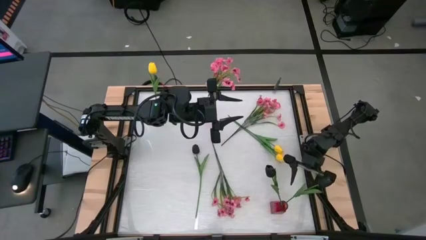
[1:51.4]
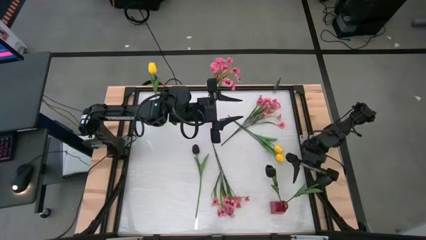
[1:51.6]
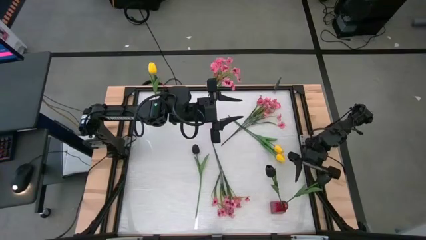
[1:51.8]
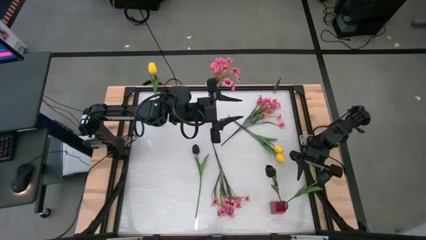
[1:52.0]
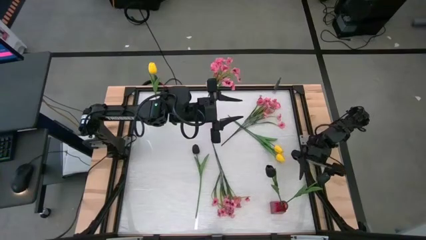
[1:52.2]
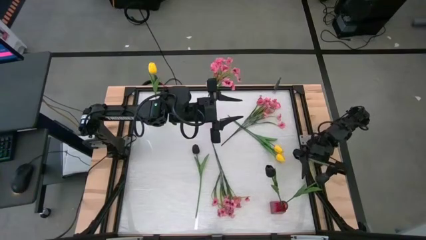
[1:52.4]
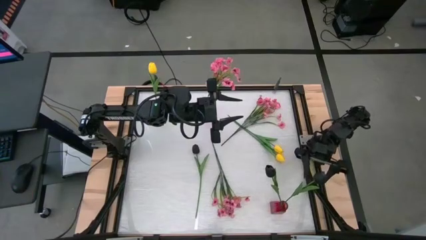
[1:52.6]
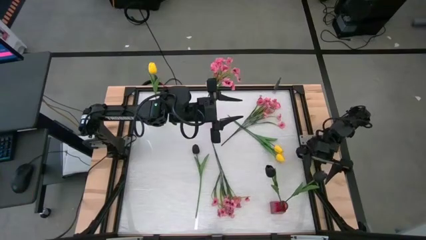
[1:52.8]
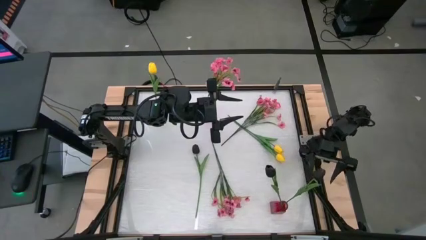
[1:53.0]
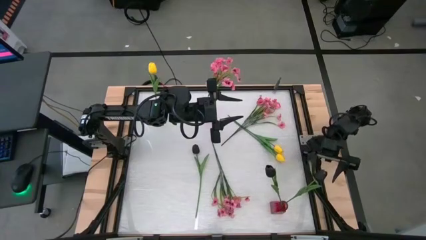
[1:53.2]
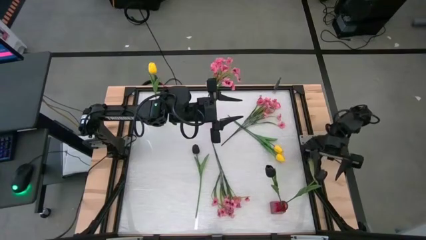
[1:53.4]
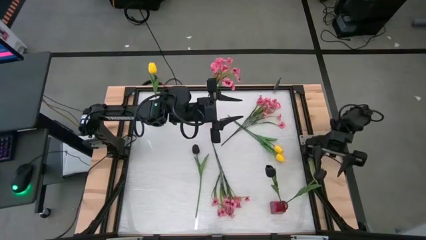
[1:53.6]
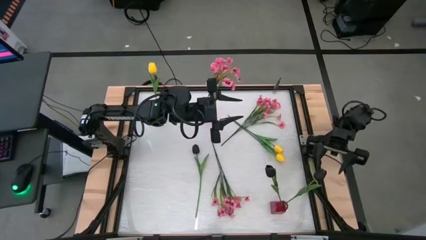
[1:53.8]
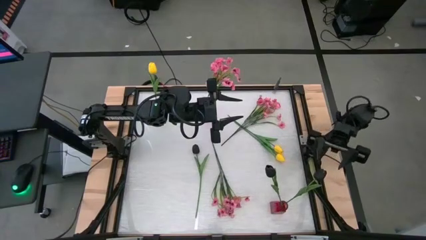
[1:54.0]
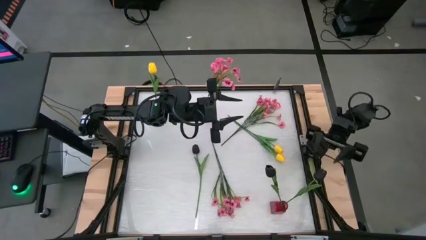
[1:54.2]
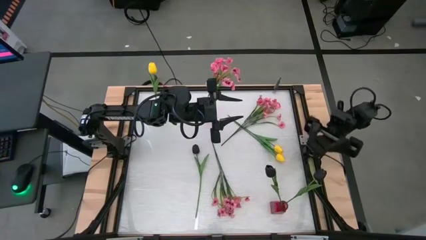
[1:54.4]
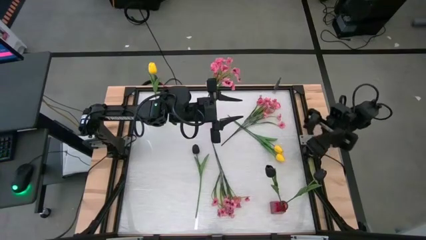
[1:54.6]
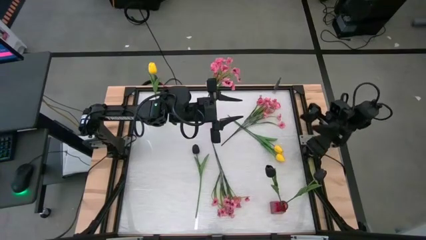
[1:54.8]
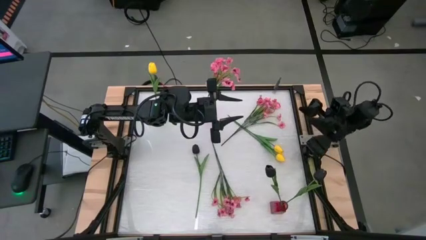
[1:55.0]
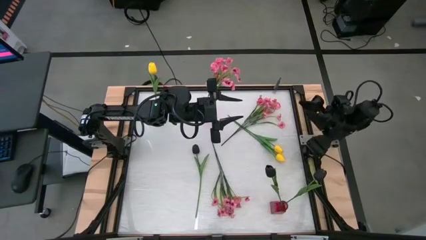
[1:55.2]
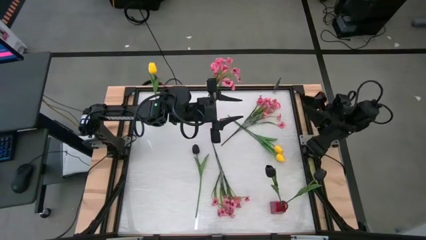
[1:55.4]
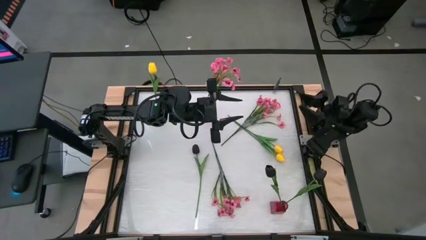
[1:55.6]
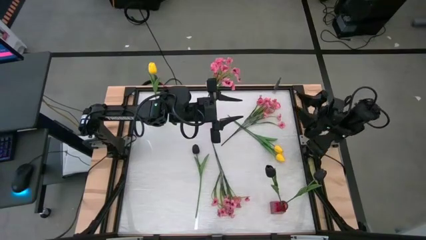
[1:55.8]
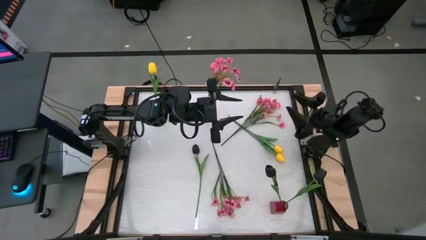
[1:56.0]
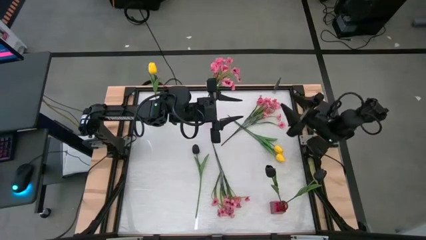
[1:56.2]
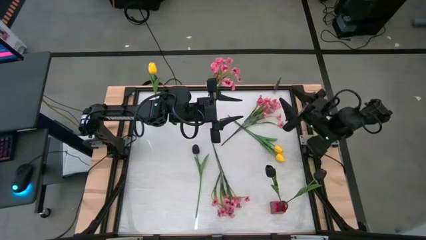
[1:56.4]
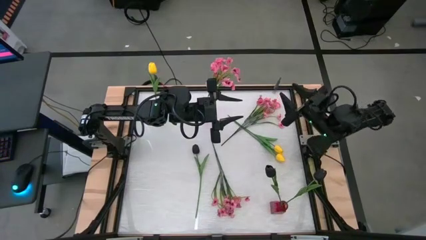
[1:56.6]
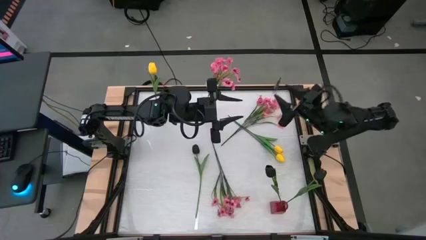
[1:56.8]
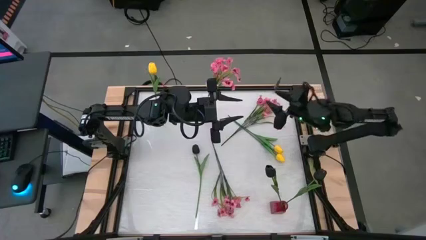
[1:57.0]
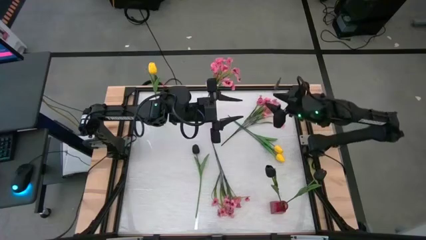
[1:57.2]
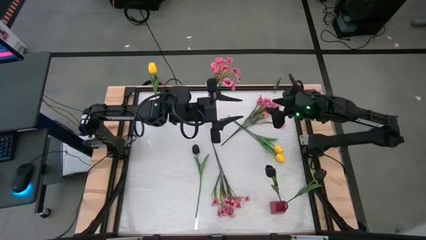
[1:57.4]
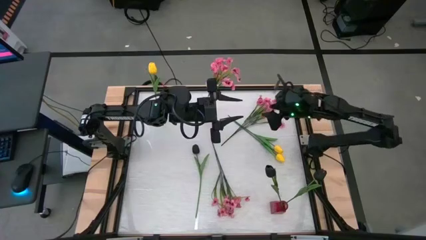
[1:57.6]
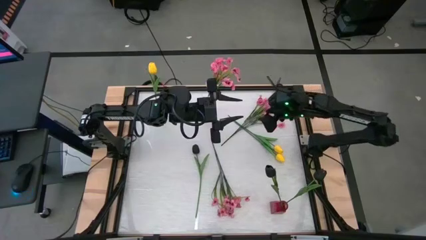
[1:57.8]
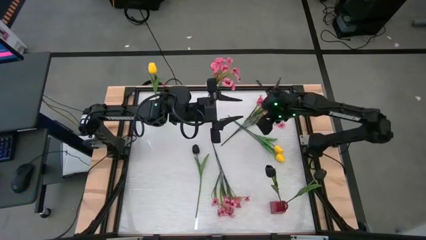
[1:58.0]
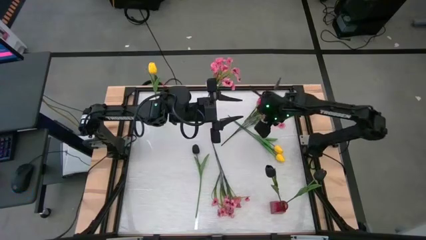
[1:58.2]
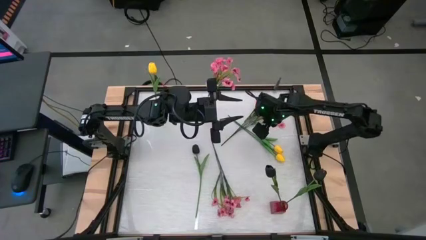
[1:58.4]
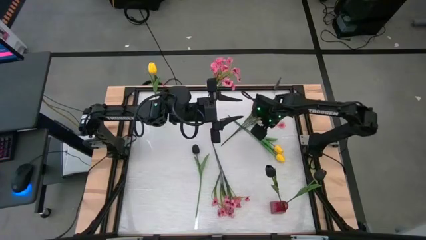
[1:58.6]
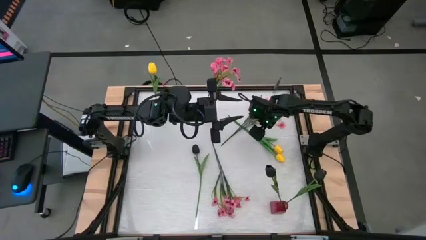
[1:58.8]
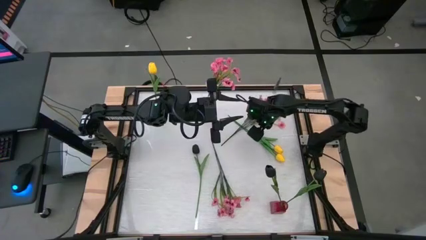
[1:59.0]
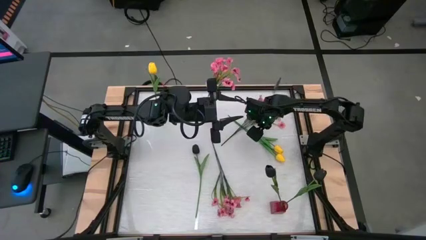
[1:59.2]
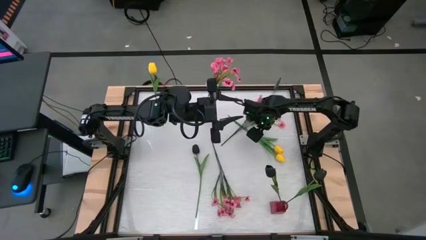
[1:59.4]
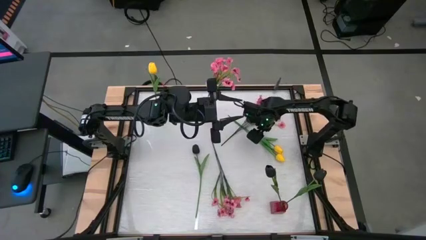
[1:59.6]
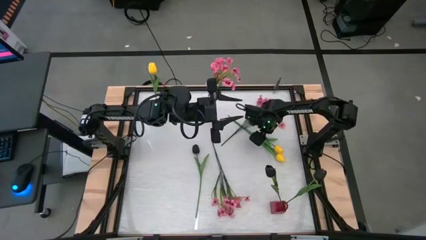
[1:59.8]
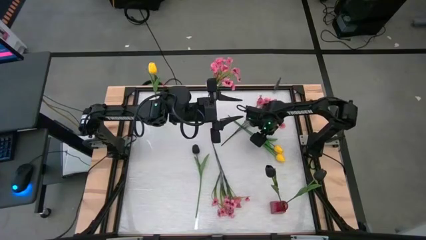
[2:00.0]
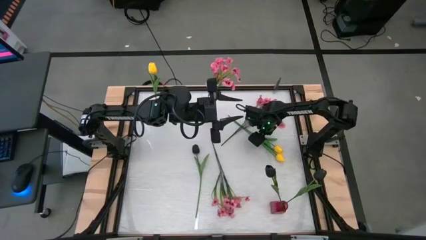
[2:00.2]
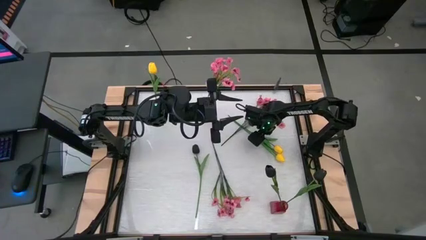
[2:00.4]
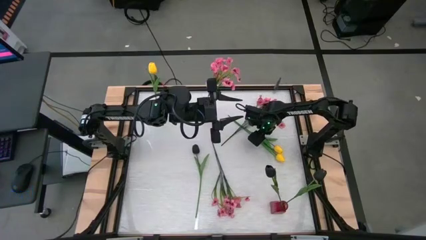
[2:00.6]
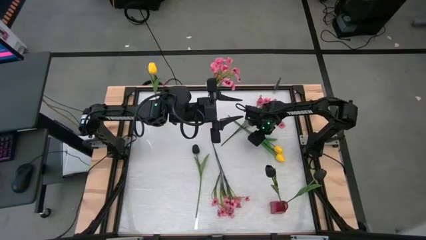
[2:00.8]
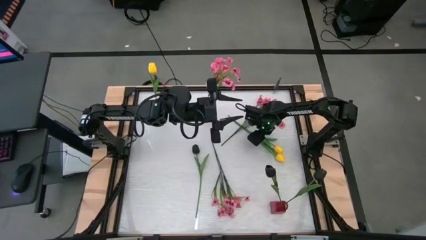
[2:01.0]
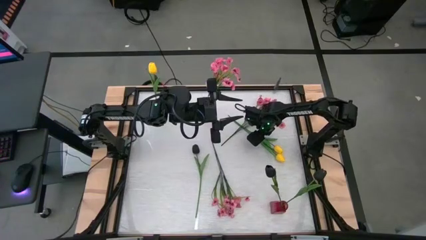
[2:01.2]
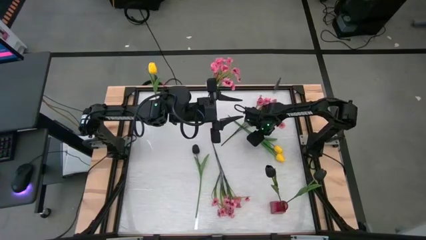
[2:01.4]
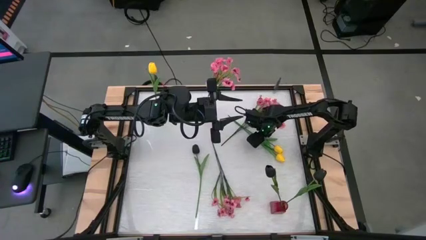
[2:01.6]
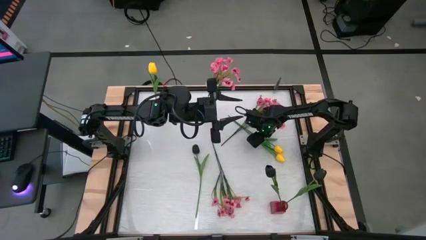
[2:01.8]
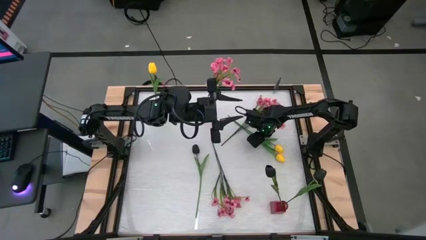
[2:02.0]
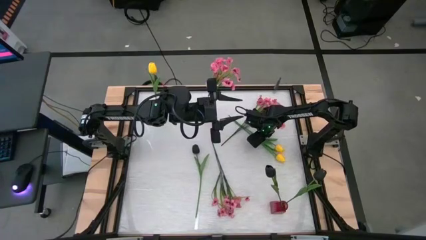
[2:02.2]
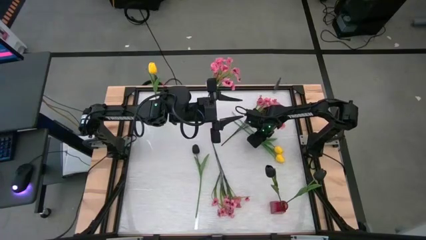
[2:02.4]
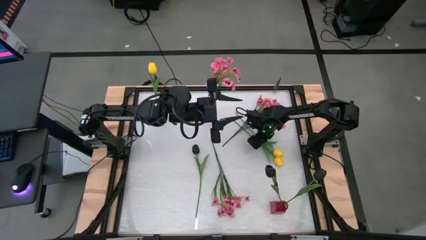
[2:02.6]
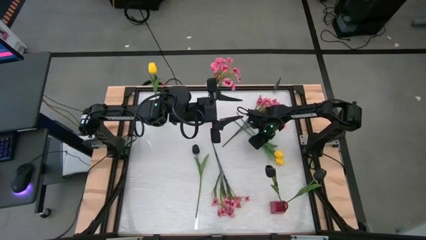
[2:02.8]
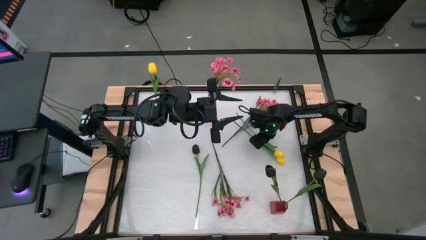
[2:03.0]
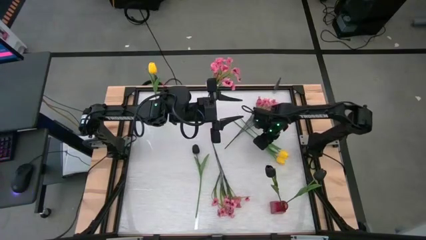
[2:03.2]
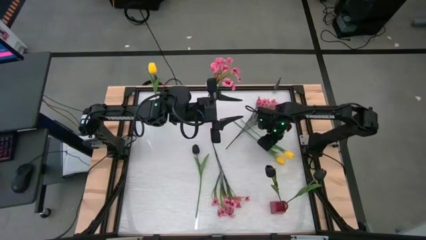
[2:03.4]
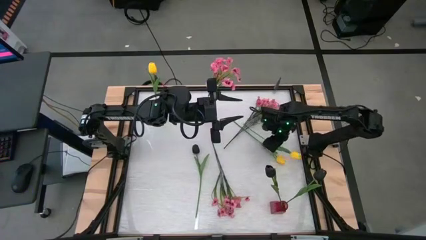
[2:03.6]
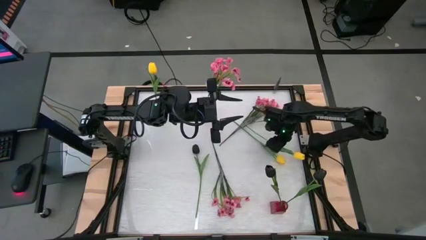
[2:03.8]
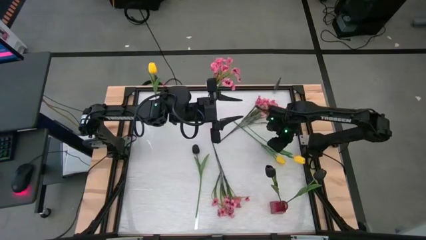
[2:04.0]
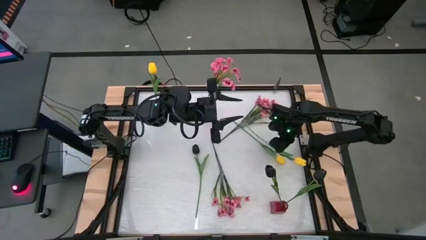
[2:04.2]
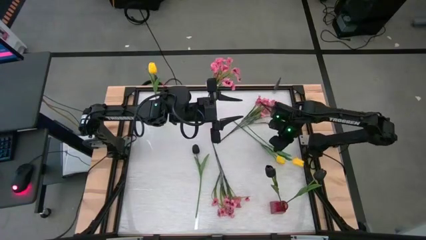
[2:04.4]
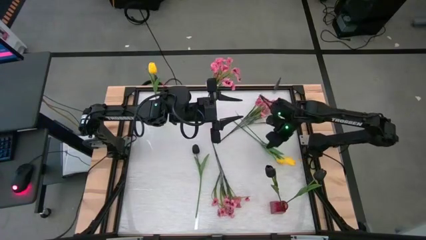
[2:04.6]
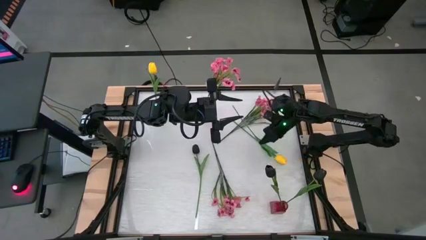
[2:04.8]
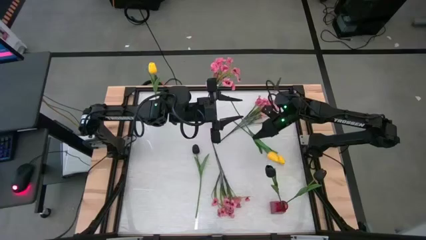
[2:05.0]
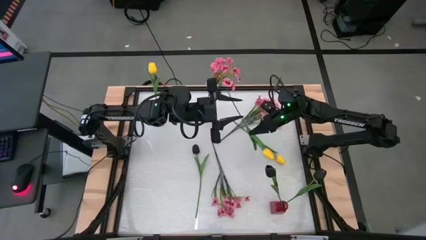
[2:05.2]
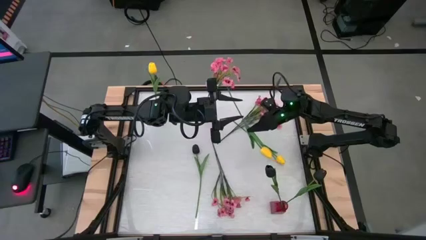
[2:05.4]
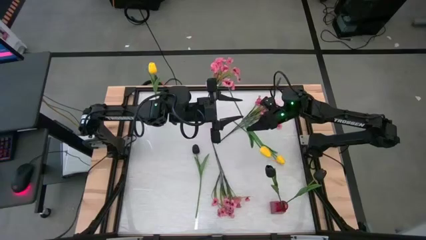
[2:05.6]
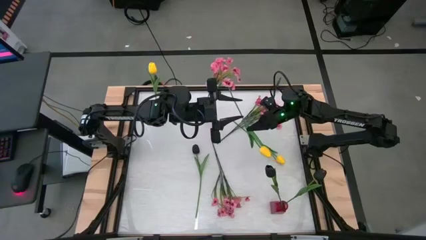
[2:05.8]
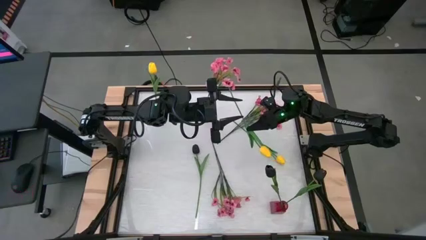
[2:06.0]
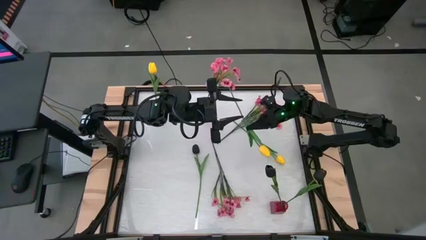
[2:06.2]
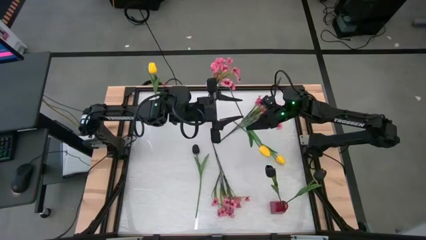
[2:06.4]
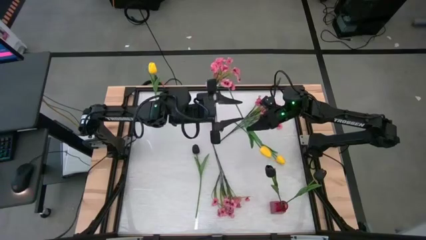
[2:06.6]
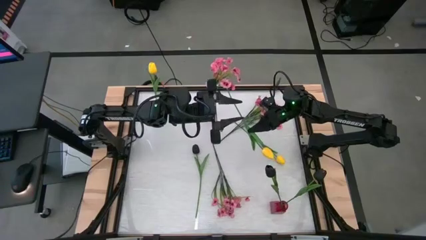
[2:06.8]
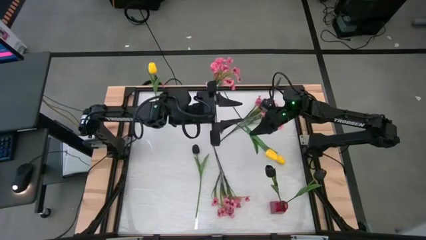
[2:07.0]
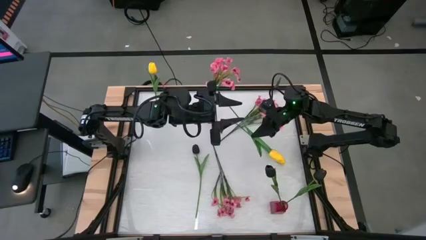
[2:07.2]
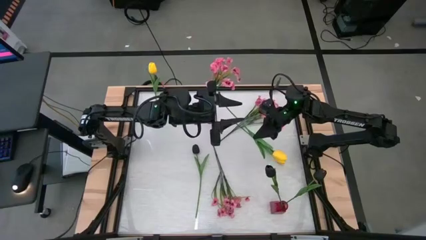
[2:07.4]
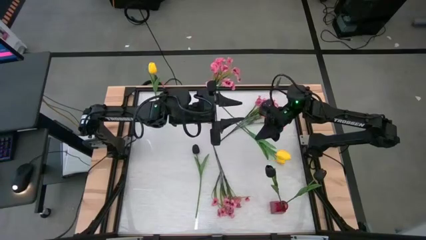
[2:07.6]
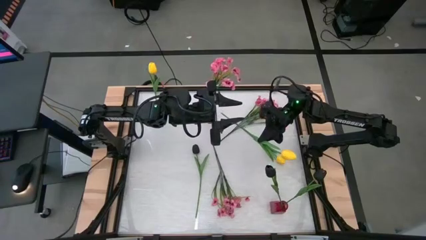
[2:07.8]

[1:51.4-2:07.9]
Task: Sort flowers into vase by color
Put the top yellow flower into the green vase

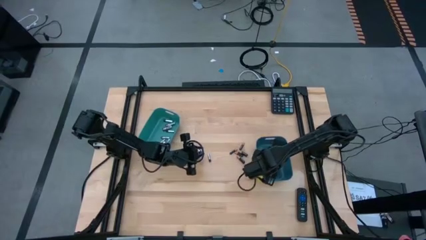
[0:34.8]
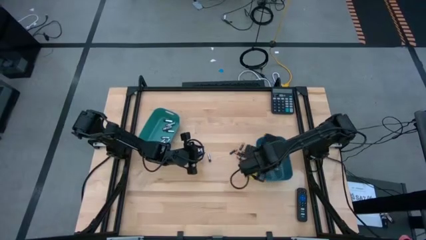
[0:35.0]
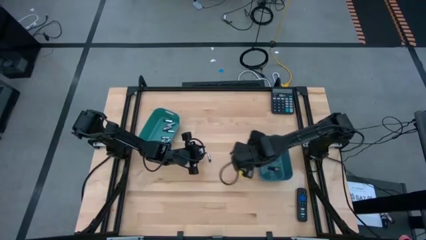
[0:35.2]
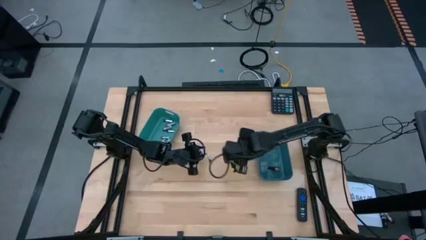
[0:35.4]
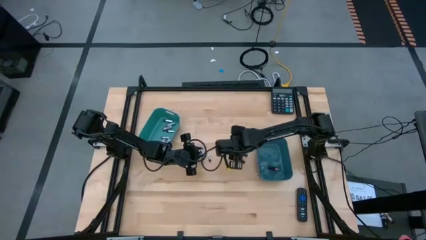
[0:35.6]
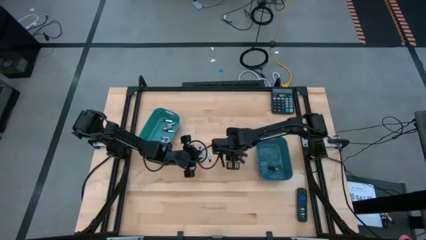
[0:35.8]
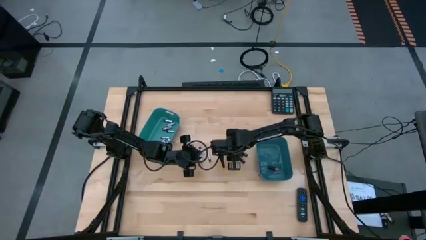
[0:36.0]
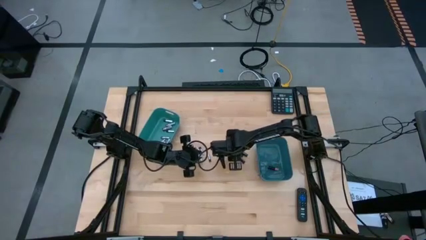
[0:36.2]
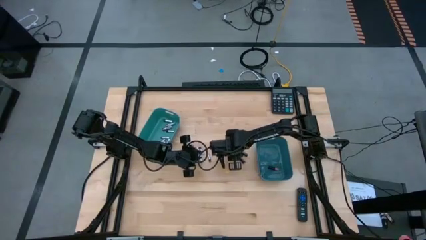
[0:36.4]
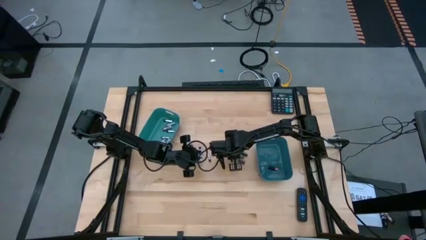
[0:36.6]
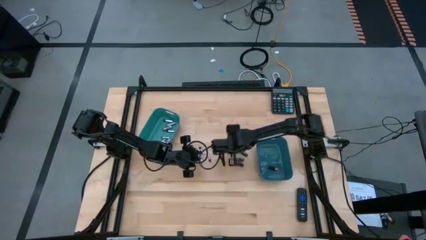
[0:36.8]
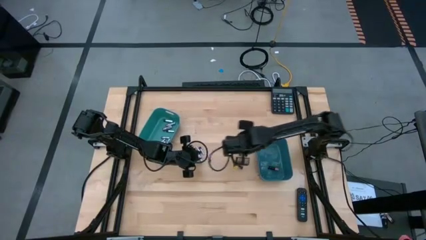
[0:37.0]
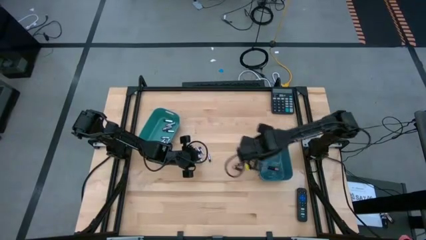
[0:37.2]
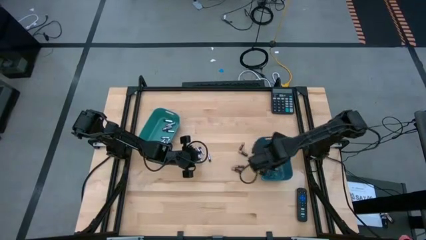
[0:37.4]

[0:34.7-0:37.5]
Task: Sort batteries
Put the black battery into the blue bin
